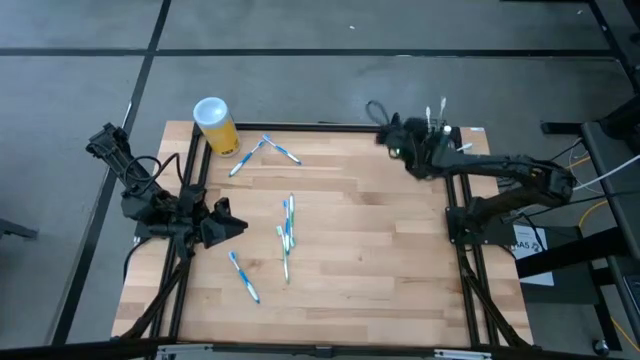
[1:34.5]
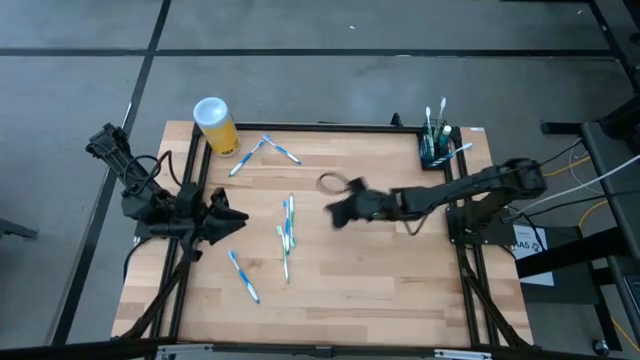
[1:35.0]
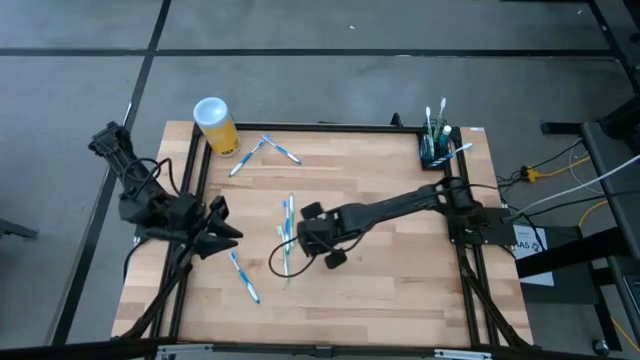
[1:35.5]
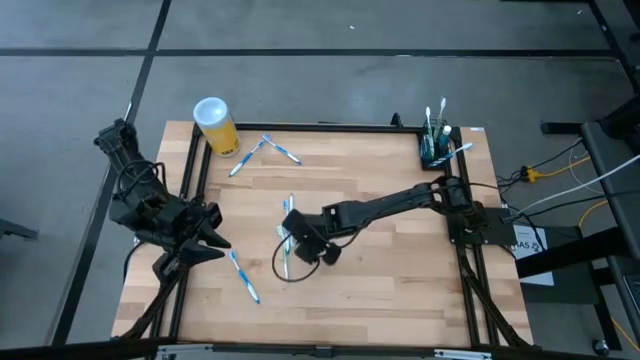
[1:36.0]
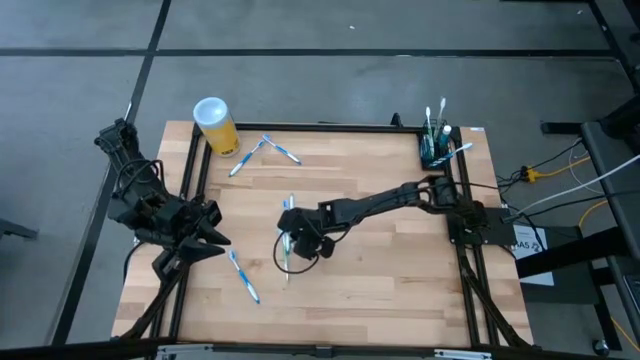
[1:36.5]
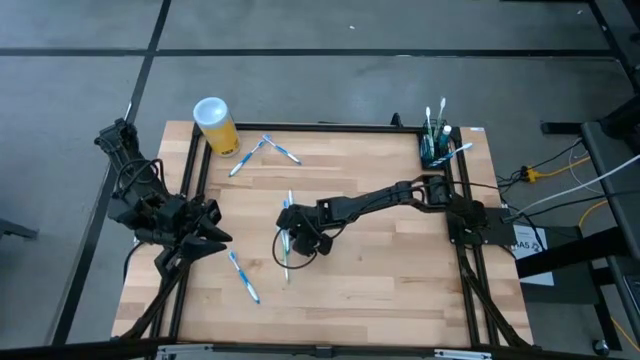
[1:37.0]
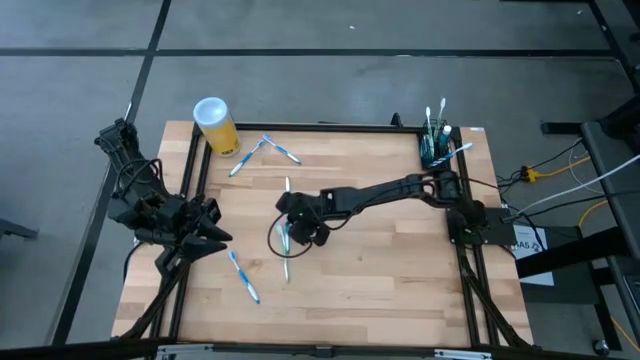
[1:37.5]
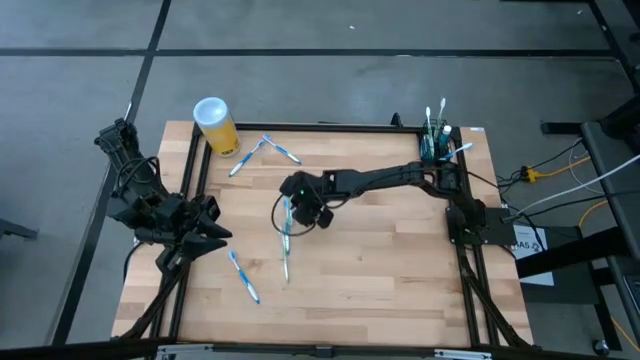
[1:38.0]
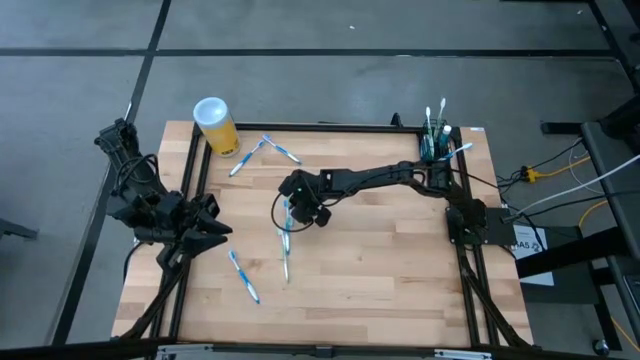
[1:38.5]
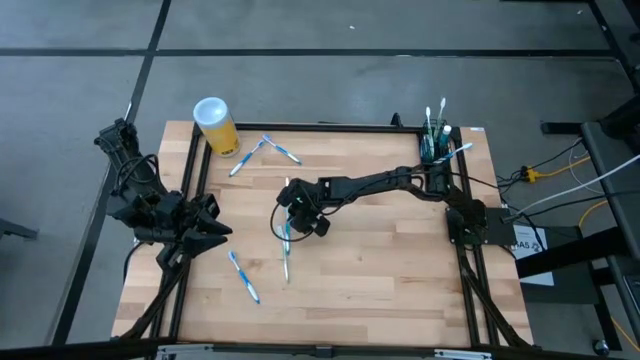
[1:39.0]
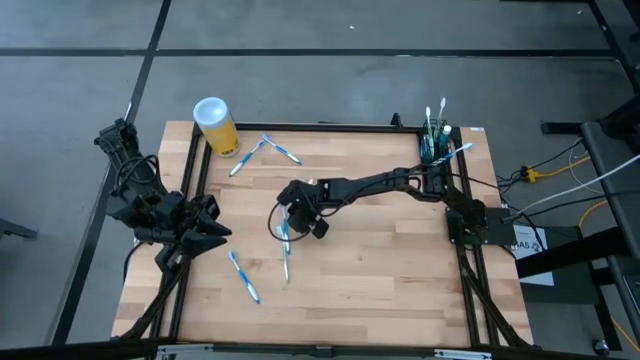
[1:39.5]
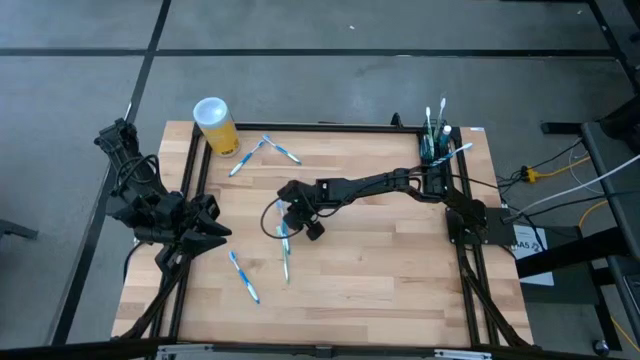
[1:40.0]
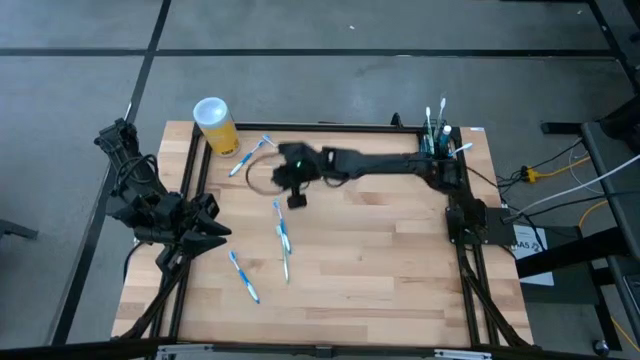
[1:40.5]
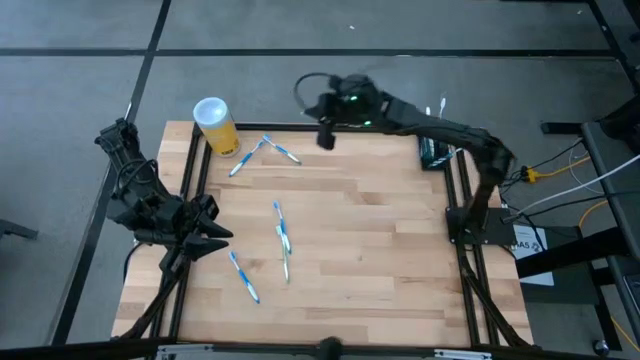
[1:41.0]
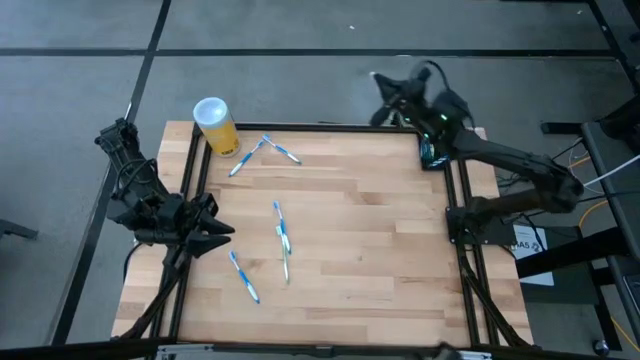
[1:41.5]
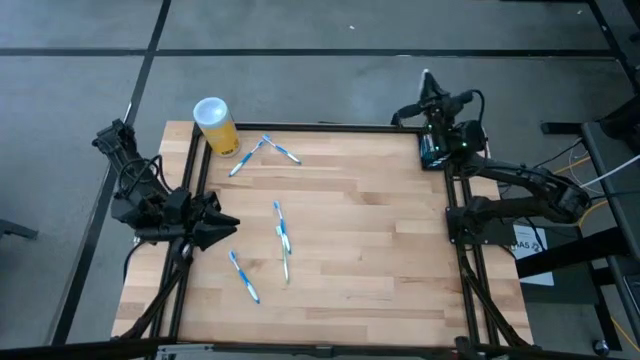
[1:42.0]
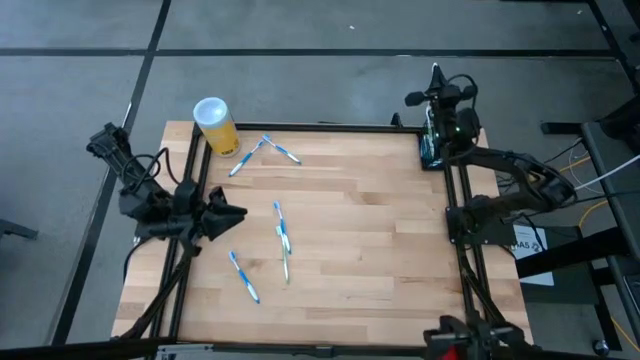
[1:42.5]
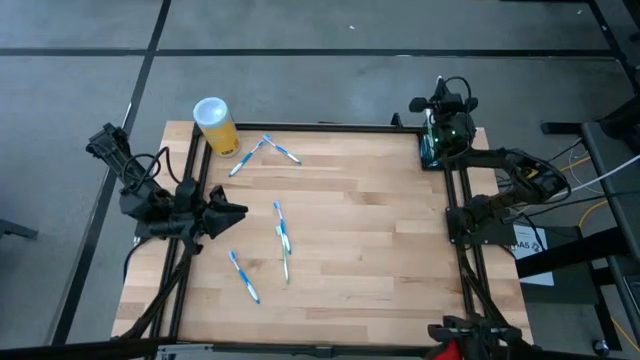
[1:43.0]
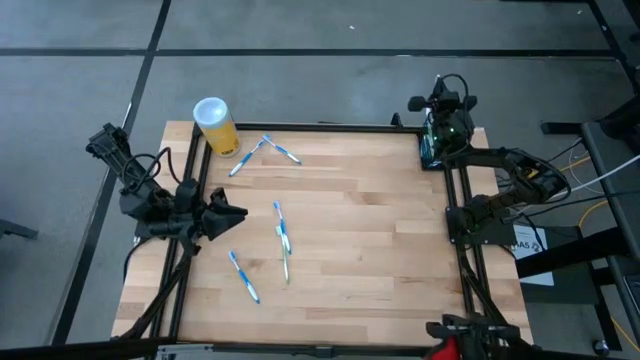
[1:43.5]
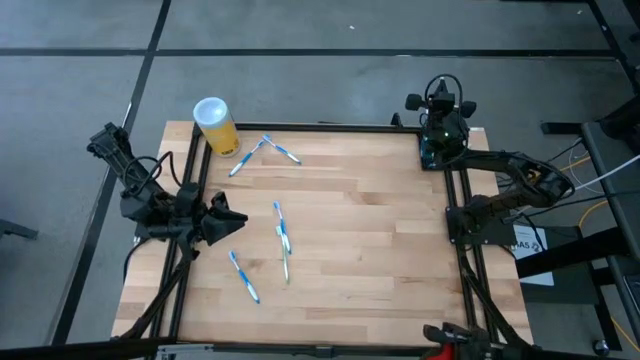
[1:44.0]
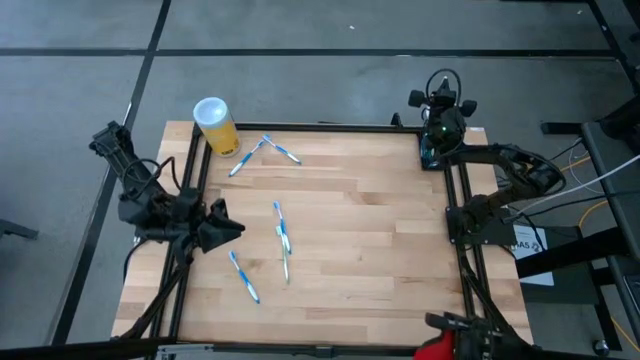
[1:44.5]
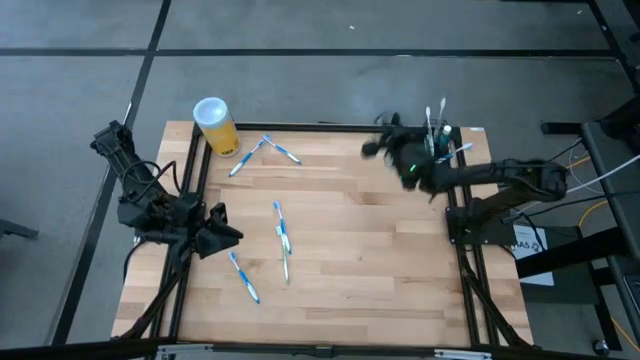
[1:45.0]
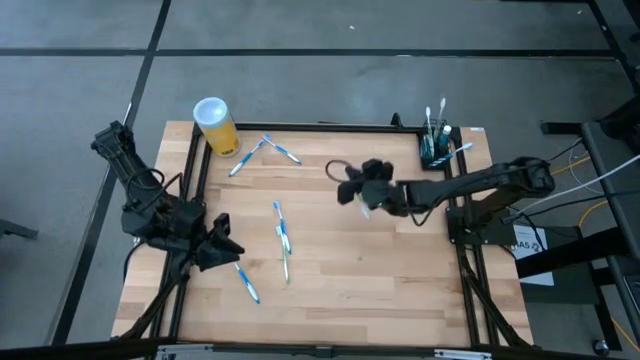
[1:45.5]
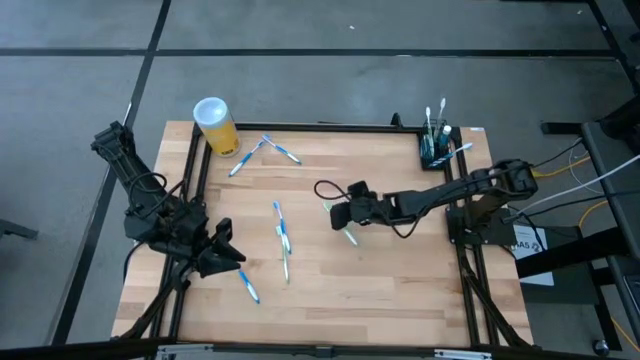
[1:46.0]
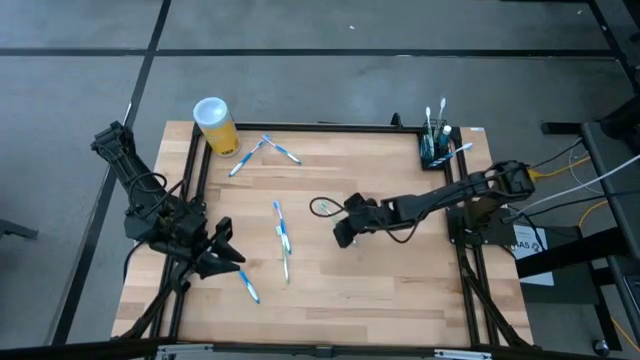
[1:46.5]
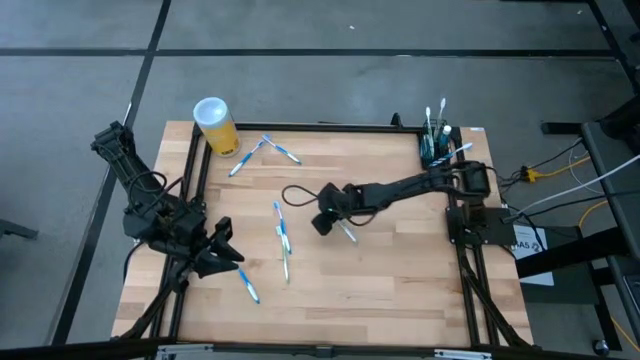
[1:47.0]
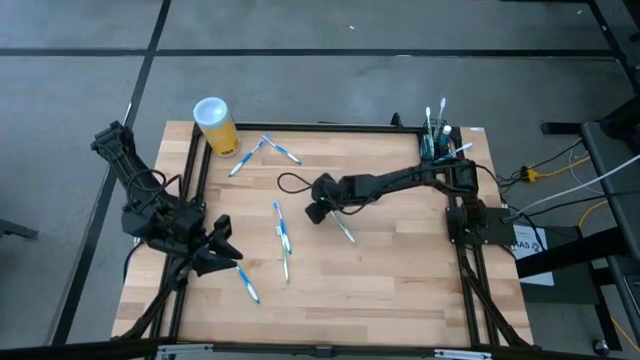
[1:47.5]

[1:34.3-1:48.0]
Task: Pick & Place toothbrushing station
Put the green toothbrush into the mesh organizer

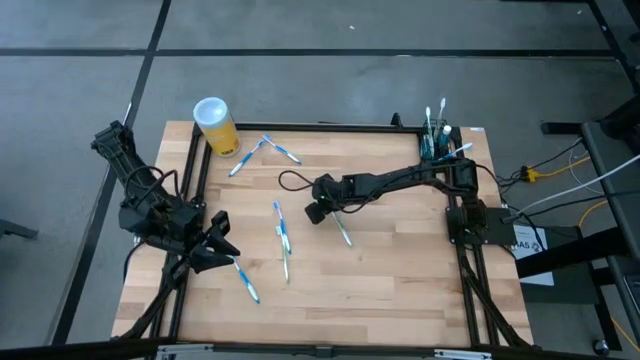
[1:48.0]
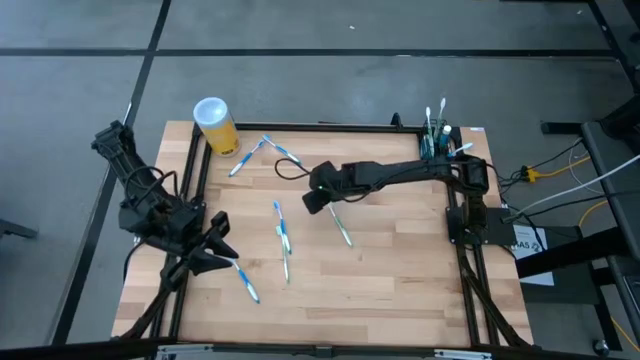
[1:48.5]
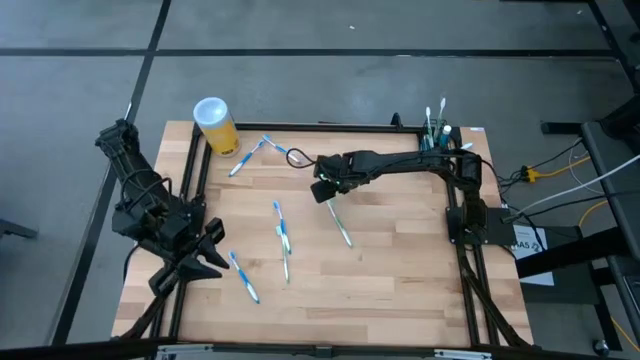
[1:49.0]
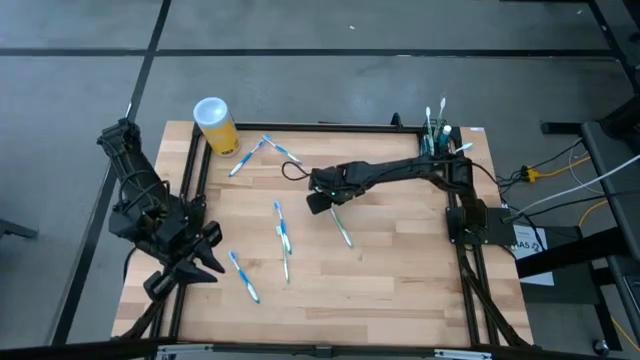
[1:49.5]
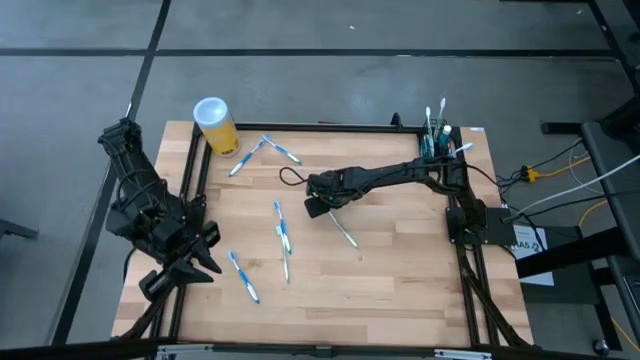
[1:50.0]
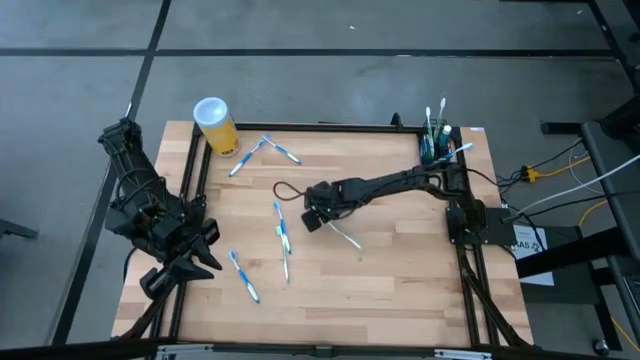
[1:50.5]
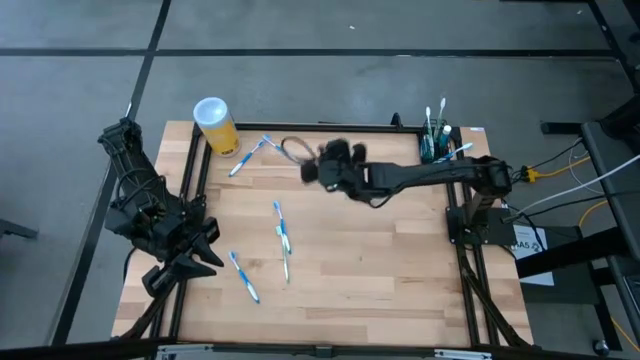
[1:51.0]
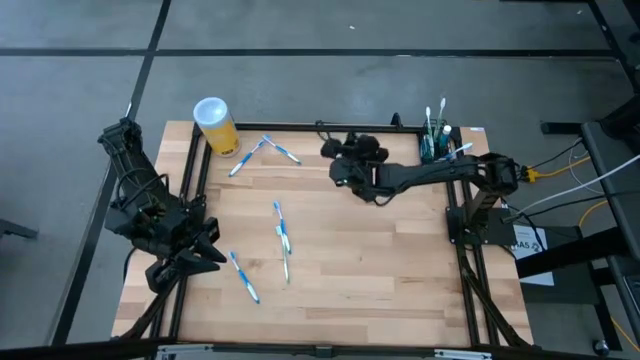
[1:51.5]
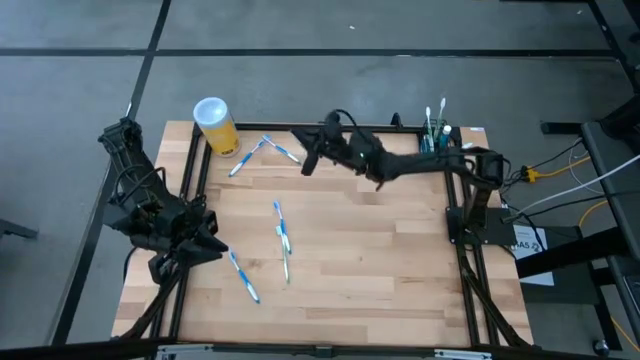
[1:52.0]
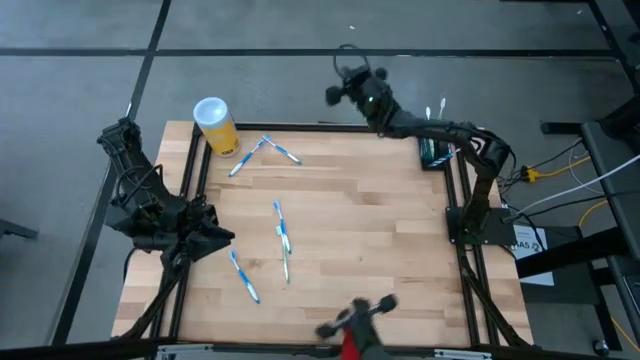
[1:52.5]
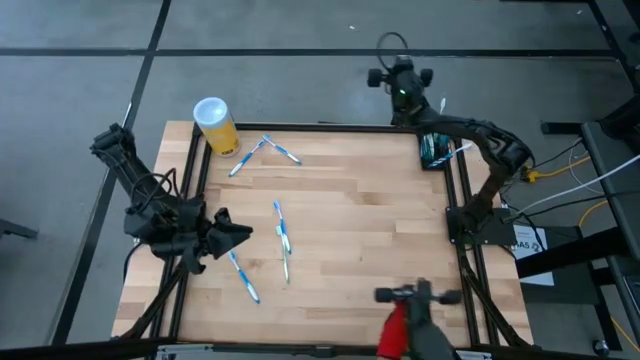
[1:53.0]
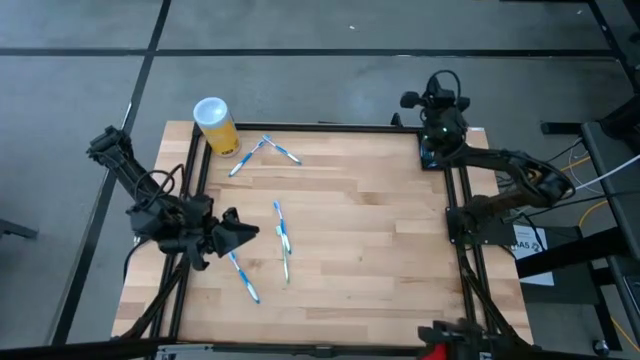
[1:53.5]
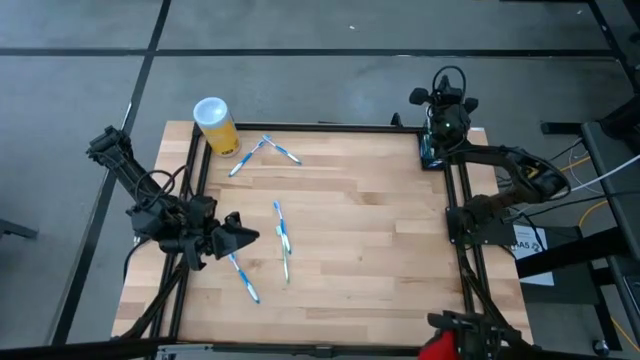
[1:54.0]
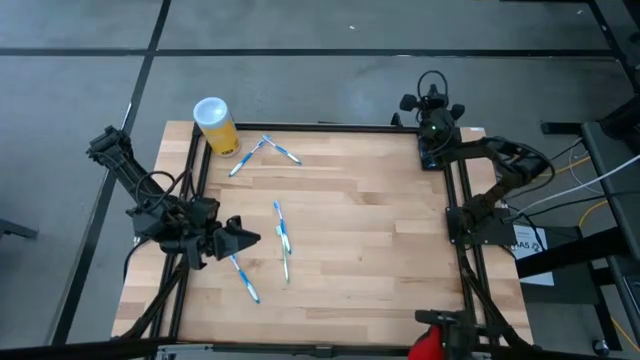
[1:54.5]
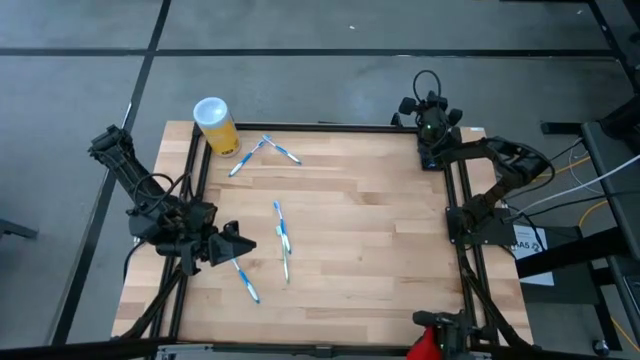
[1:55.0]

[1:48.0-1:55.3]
Put the green toothbrush into the mesh organizer

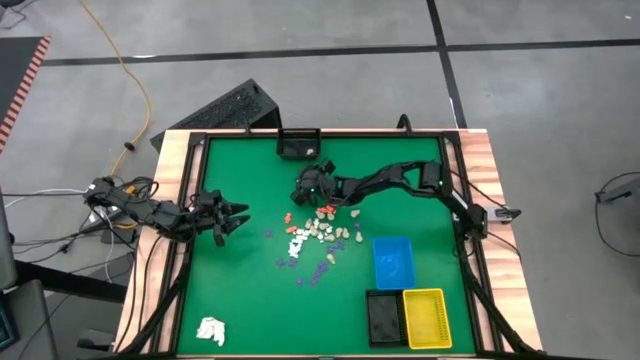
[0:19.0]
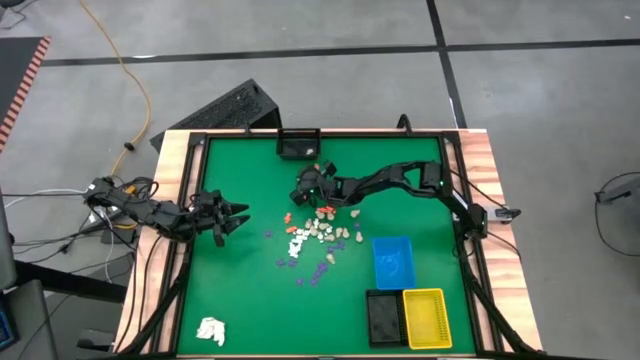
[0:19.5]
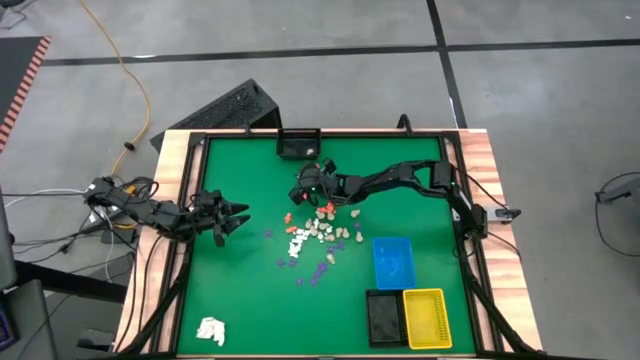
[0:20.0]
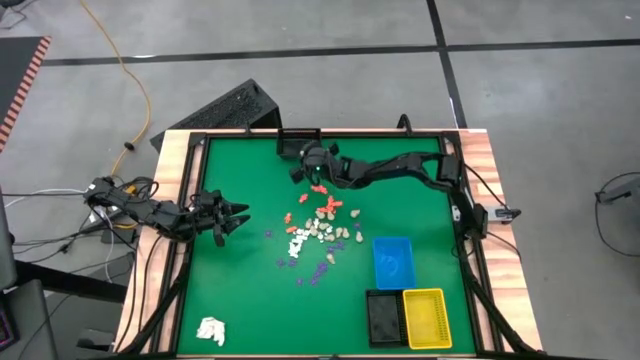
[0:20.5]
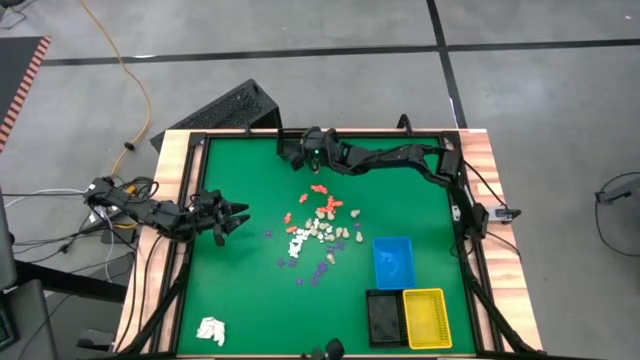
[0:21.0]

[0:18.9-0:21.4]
Task: Sort Halloween decoration
Put the gray skull toy into the top black bin
